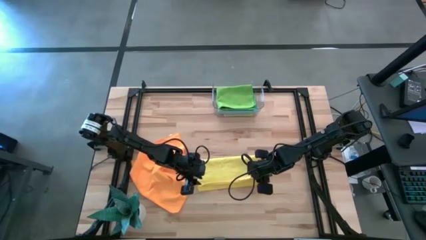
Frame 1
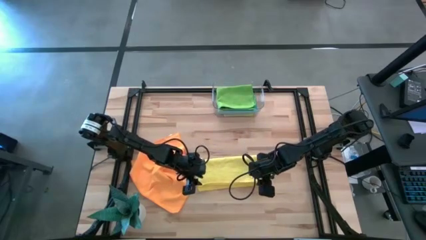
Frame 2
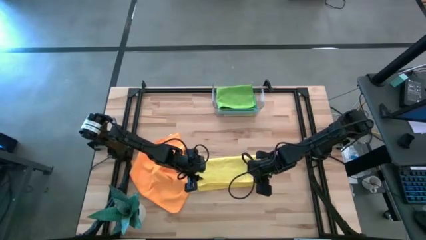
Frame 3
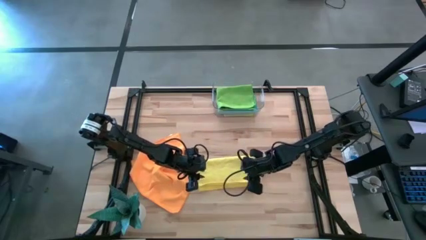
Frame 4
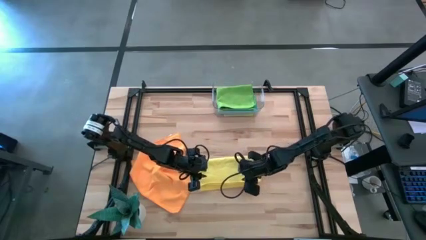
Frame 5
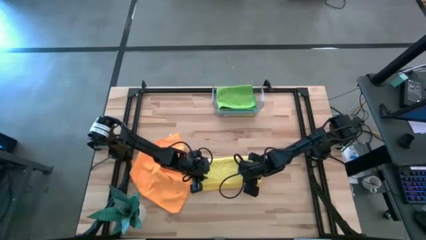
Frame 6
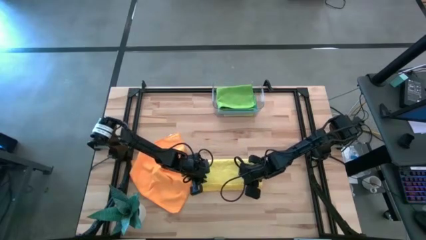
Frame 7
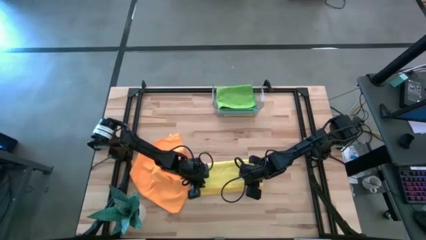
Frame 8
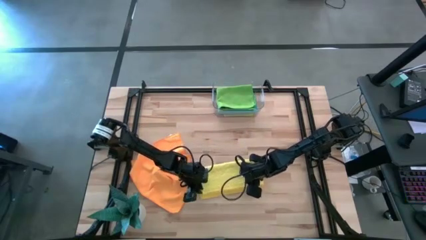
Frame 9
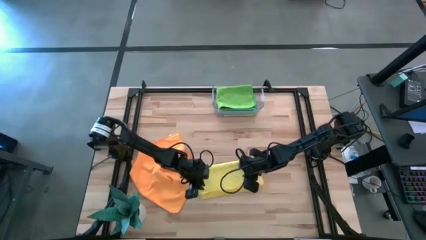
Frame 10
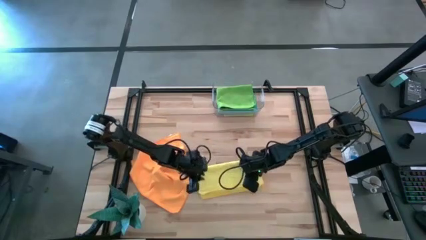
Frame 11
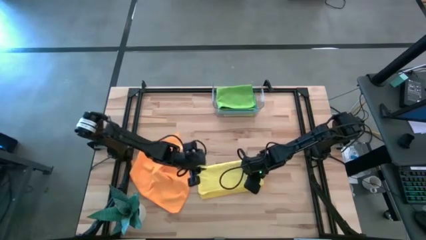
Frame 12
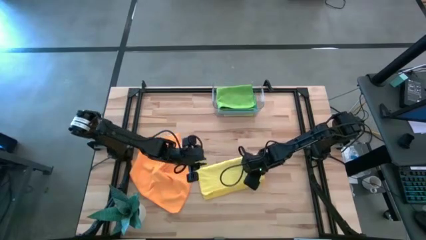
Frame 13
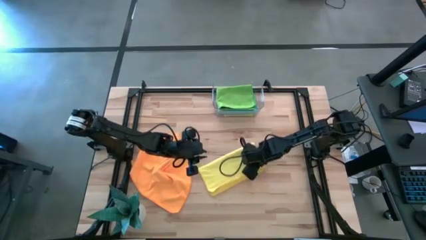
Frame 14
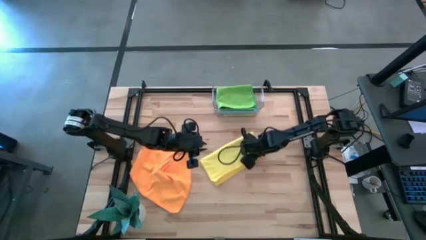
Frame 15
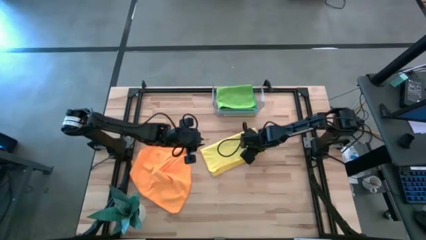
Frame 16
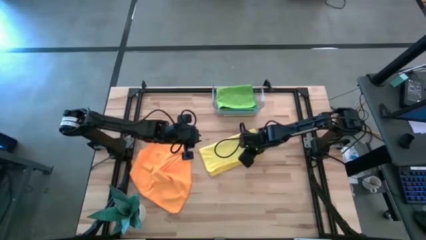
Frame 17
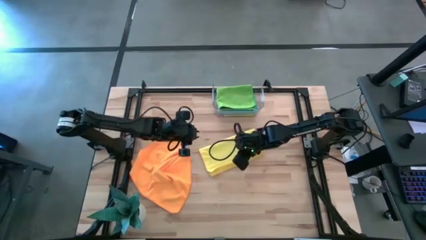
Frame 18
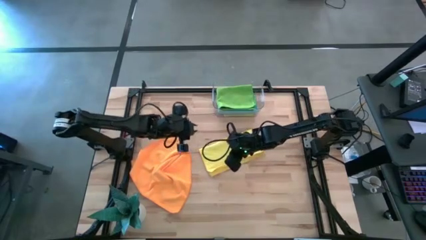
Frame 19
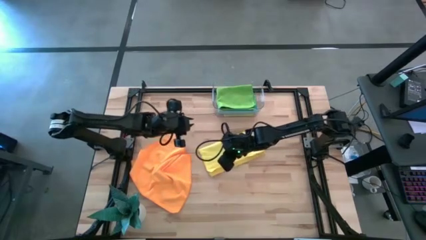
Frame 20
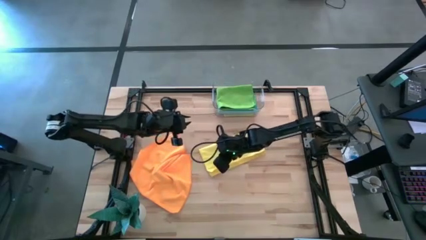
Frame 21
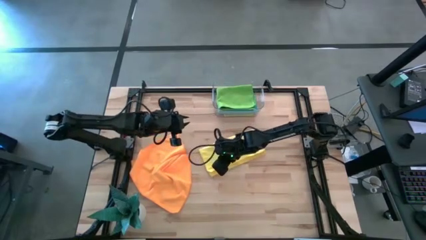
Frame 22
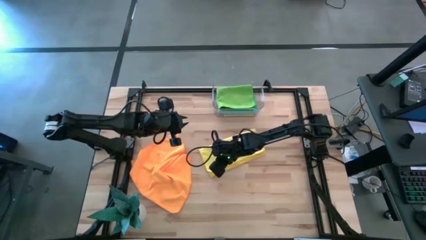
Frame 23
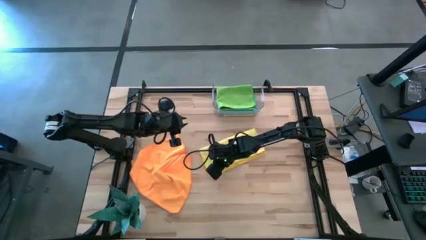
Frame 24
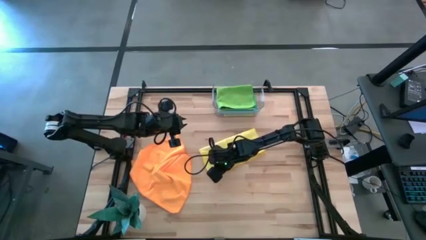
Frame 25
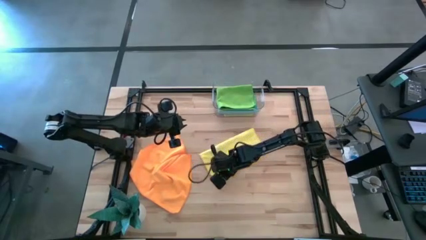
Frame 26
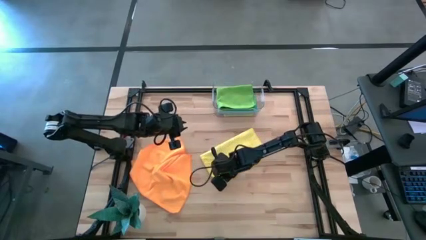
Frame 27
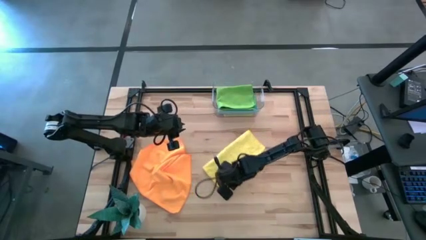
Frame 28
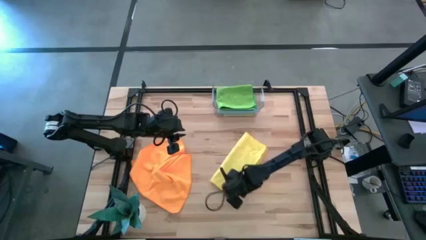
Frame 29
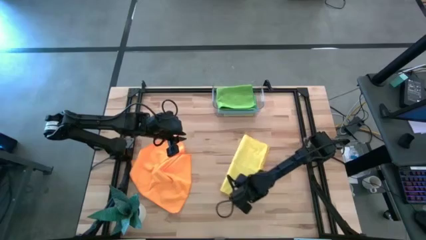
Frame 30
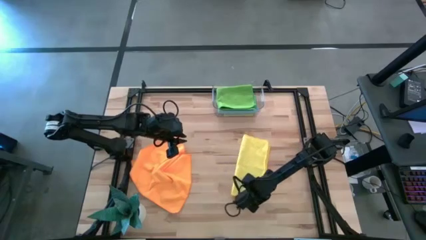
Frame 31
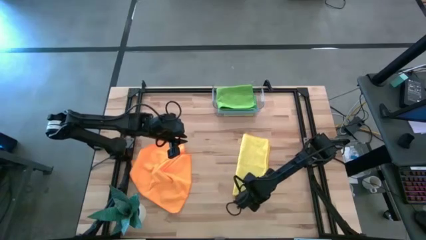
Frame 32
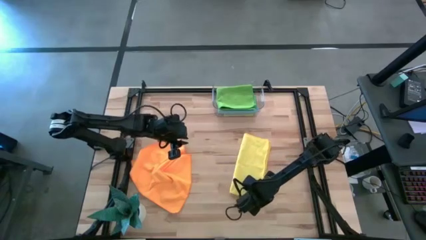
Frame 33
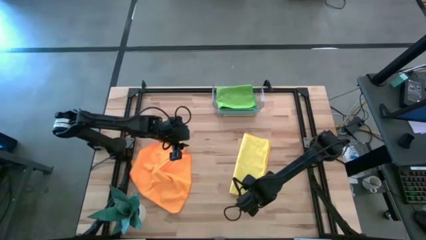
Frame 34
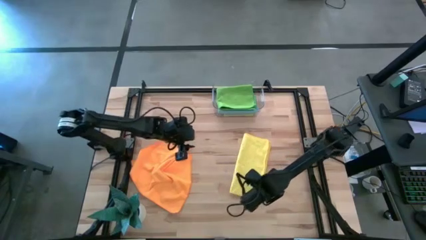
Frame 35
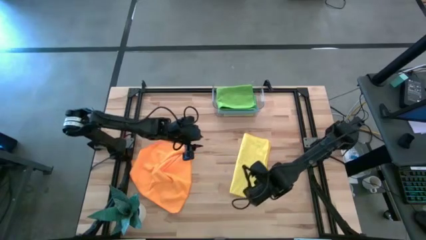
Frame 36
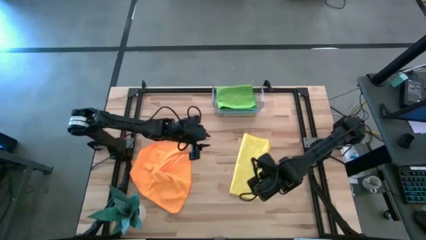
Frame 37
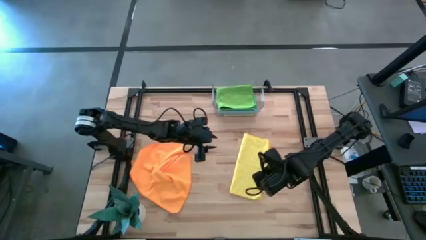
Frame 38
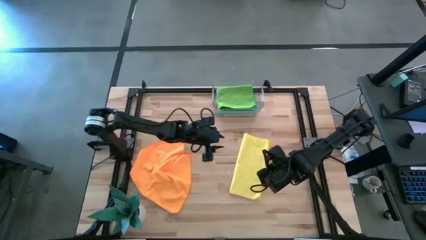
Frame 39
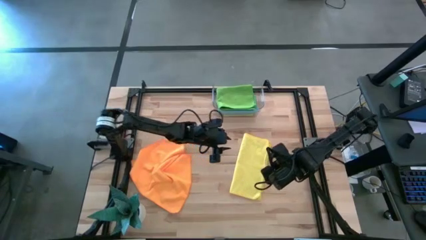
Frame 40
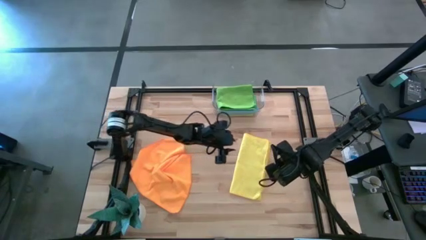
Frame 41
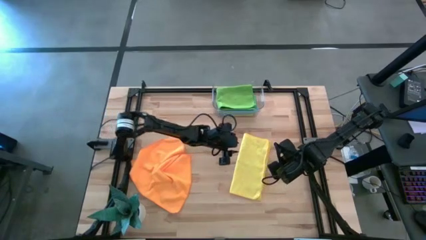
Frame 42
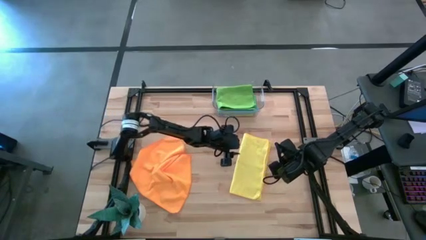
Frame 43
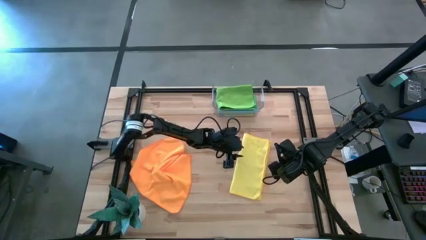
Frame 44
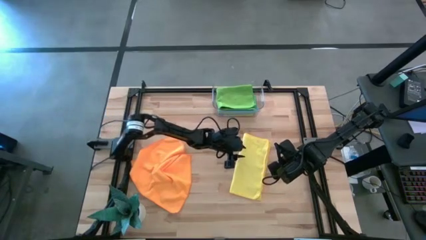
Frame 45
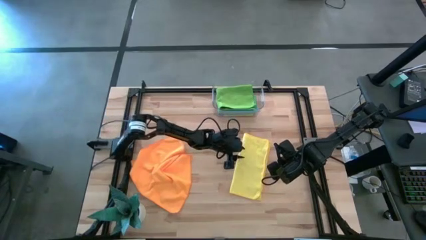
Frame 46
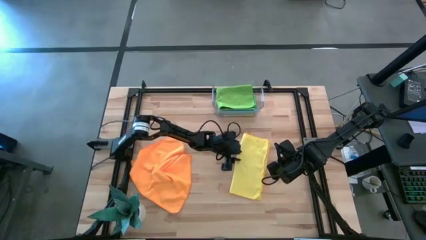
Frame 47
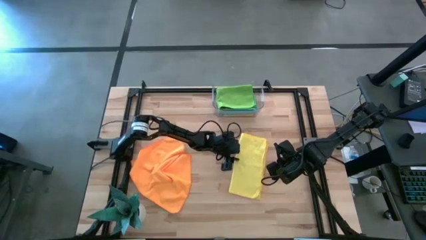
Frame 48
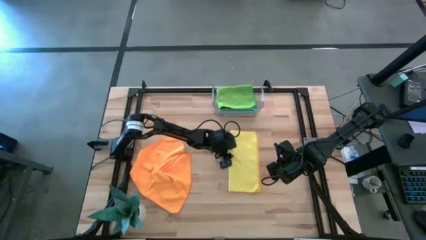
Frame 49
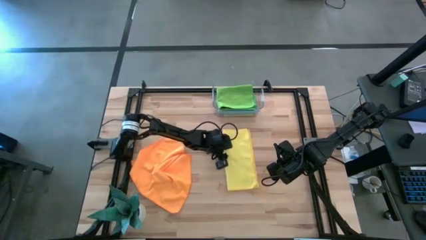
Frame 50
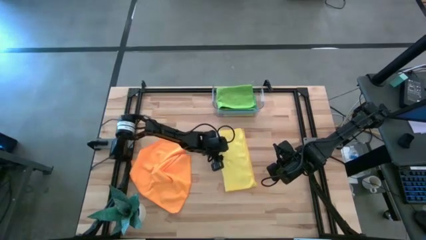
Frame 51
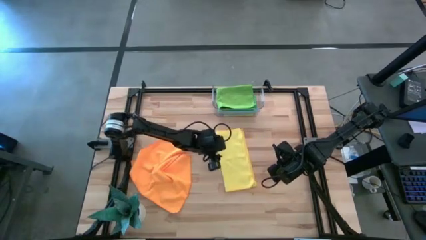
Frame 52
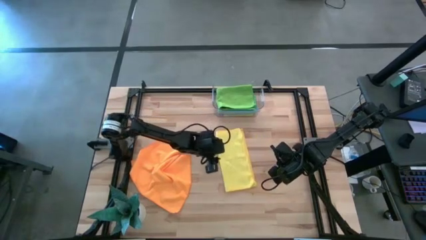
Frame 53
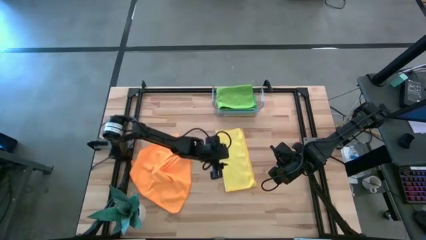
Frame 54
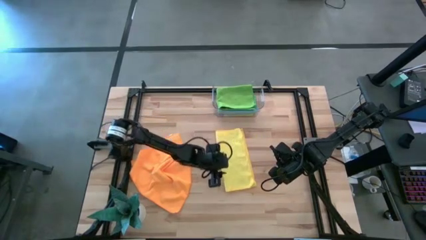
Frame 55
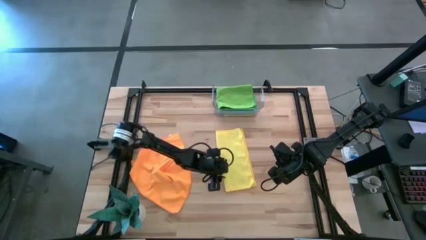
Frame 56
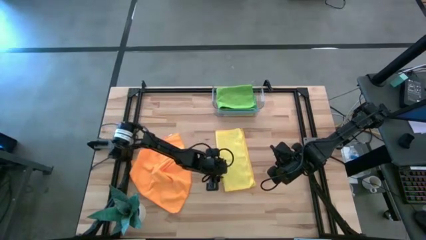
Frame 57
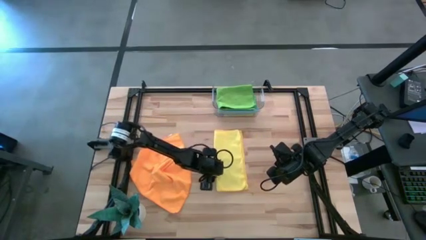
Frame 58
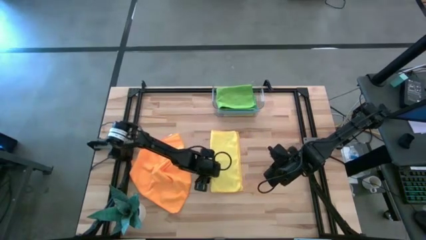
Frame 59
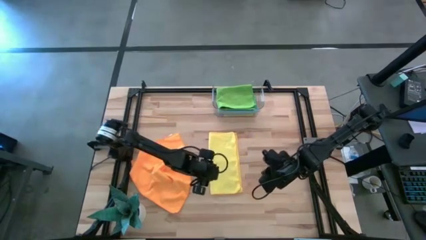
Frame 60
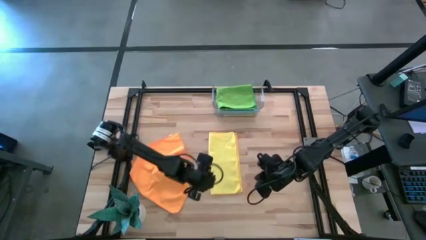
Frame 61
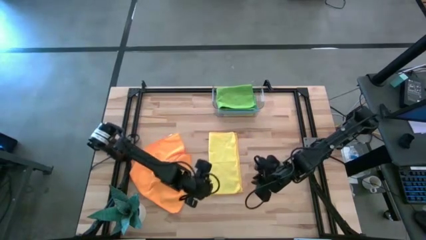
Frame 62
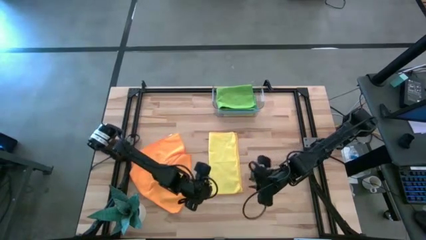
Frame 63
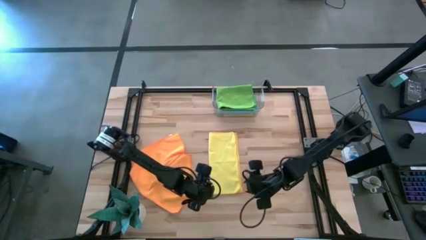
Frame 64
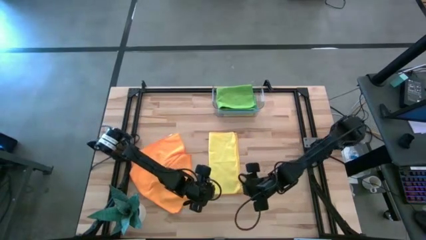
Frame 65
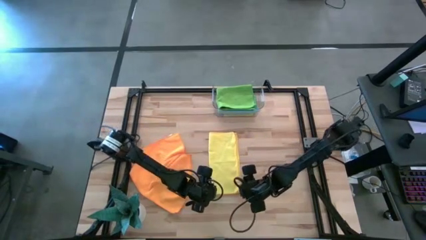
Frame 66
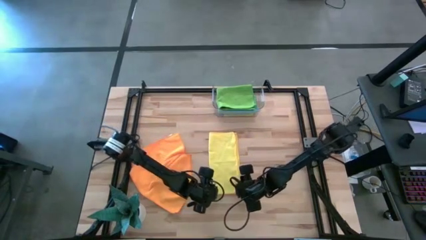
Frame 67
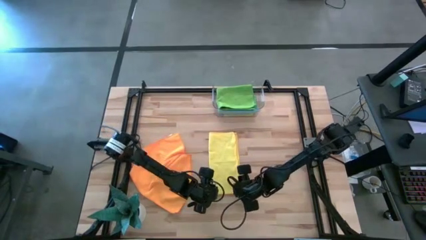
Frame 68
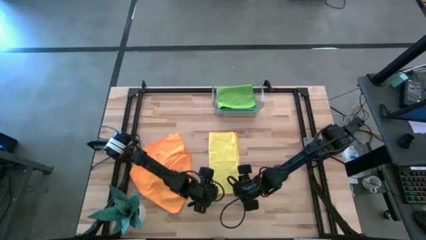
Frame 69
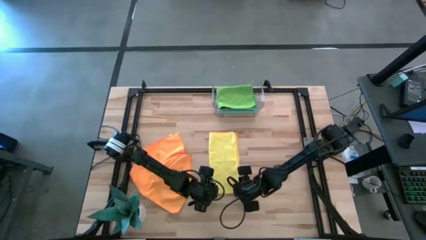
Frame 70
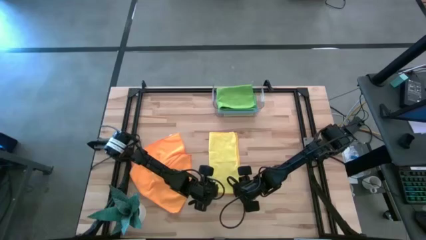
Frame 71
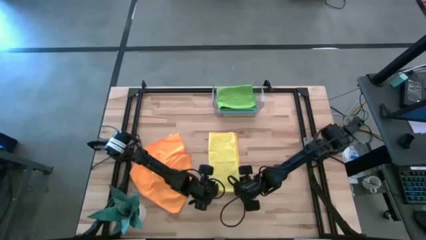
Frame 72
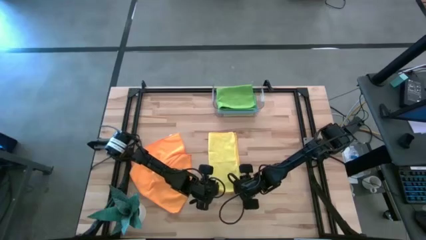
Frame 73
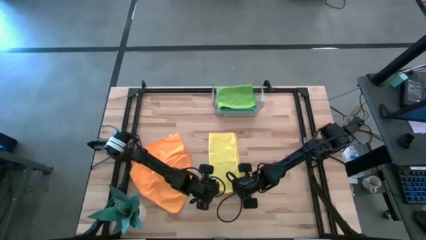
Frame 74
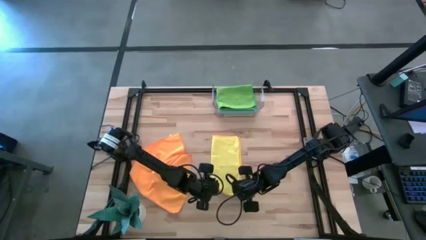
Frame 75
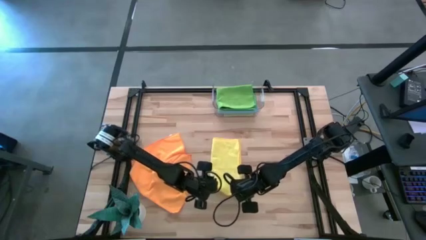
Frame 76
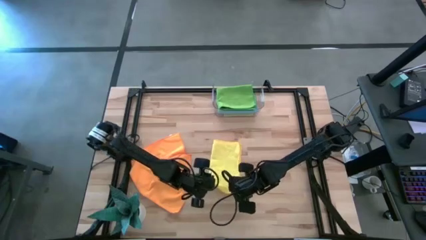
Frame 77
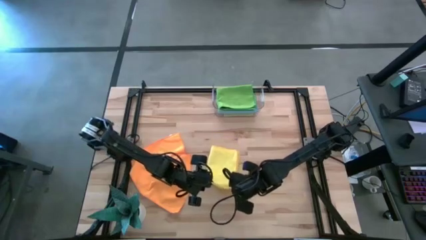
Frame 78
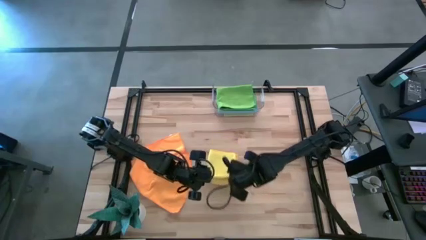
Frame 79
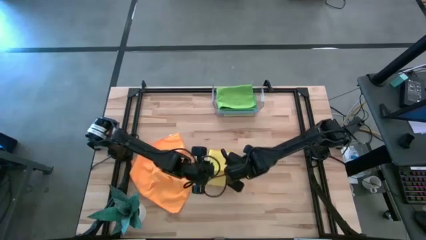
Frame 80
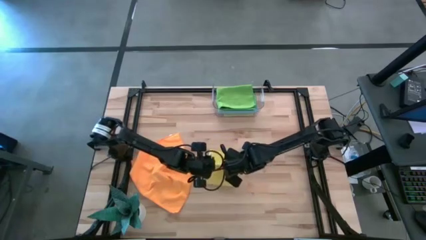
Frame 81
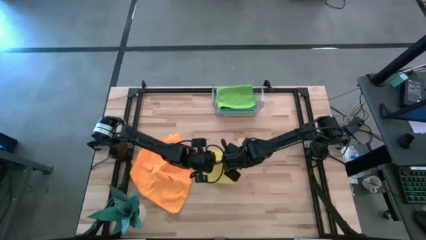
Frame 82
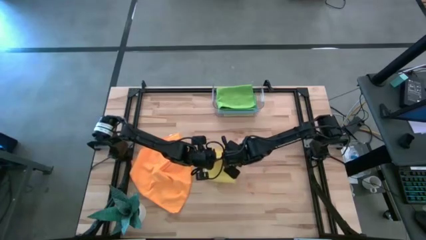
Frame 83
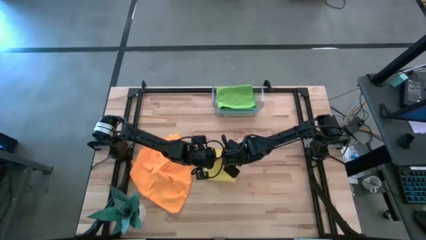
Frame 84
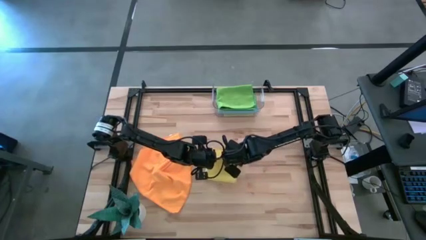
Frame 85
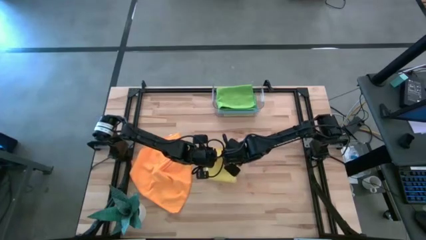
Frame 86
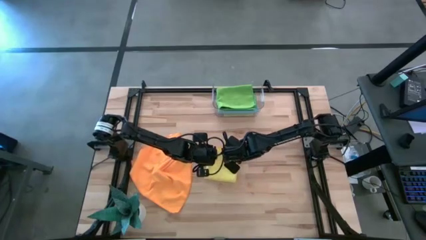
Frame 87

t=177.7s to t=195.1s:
Task: Fold microfiber towels
Fold the yellow microfiber cloth
